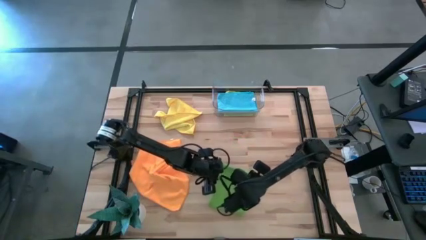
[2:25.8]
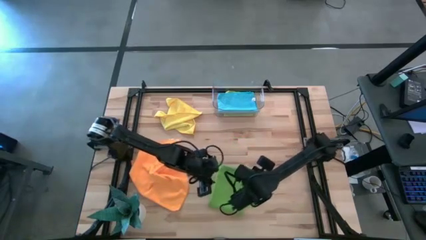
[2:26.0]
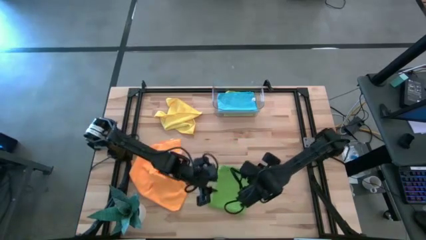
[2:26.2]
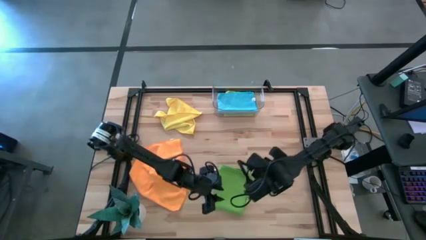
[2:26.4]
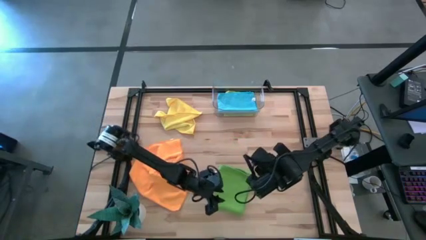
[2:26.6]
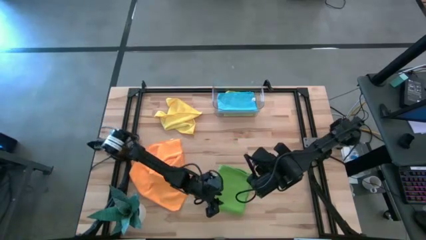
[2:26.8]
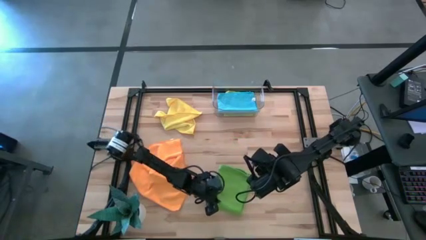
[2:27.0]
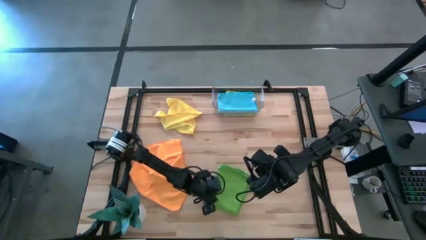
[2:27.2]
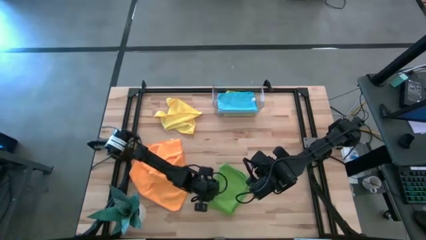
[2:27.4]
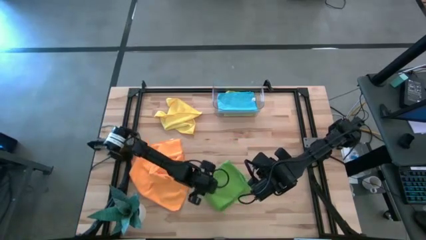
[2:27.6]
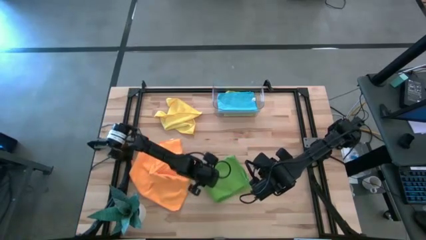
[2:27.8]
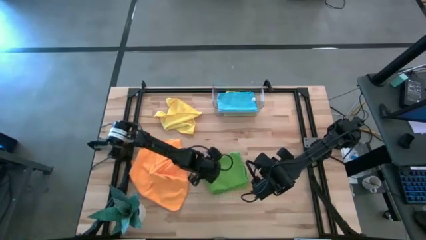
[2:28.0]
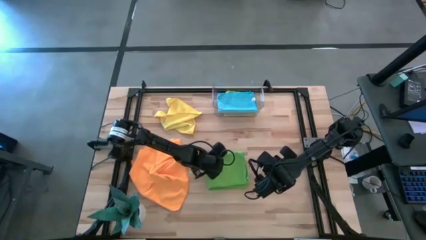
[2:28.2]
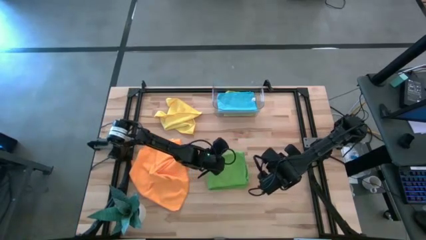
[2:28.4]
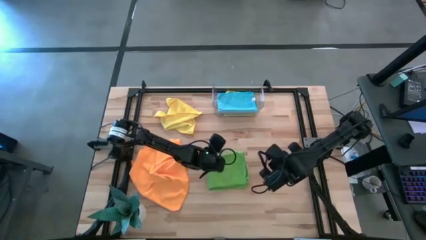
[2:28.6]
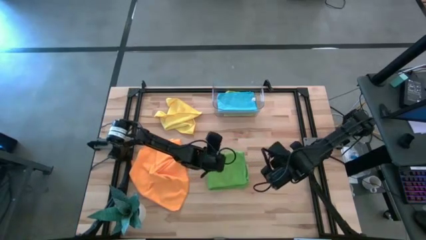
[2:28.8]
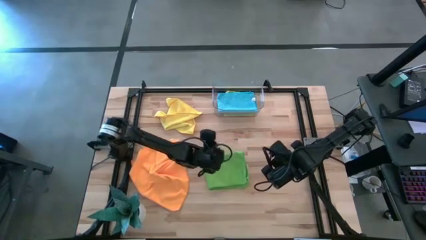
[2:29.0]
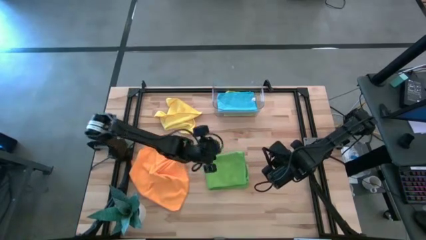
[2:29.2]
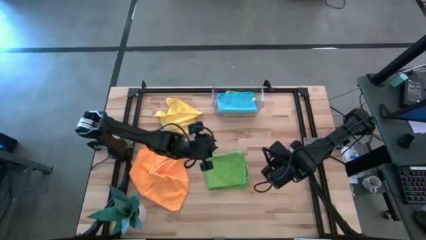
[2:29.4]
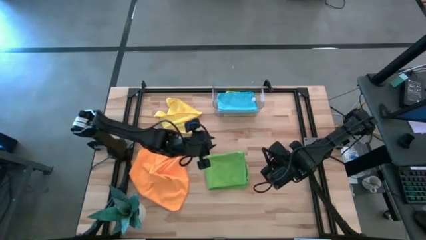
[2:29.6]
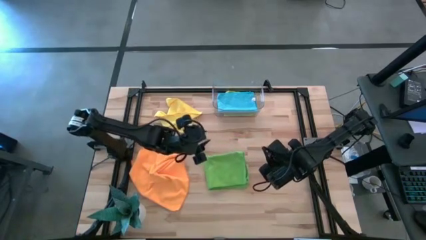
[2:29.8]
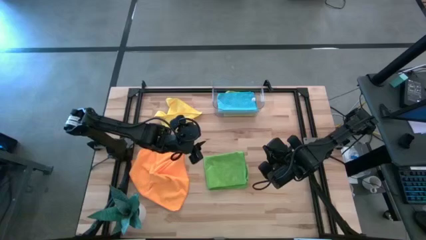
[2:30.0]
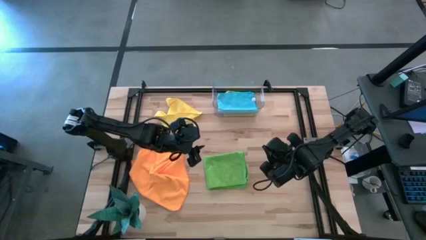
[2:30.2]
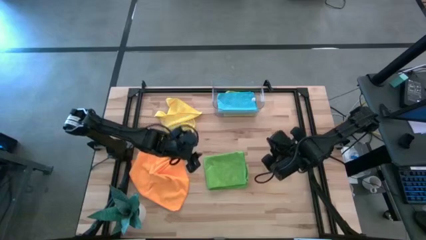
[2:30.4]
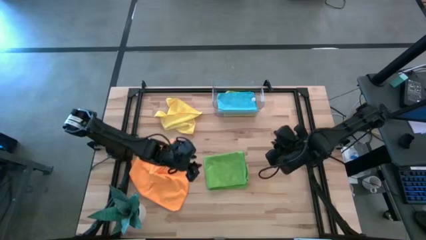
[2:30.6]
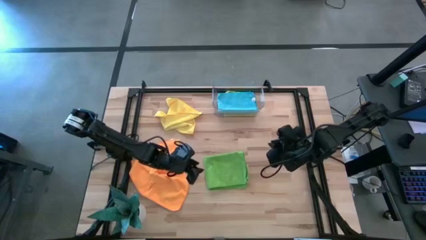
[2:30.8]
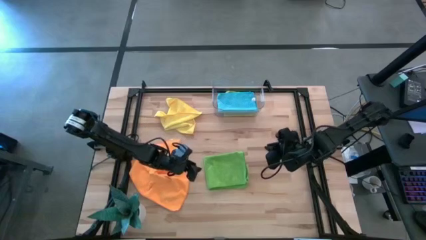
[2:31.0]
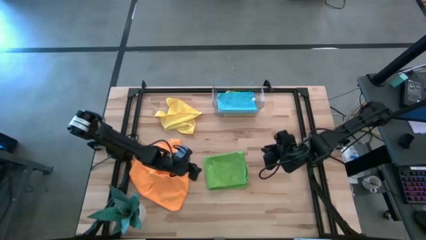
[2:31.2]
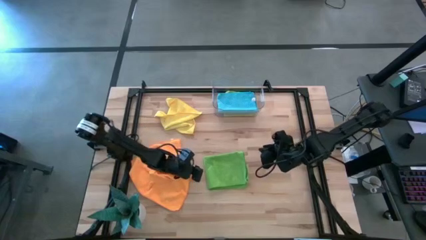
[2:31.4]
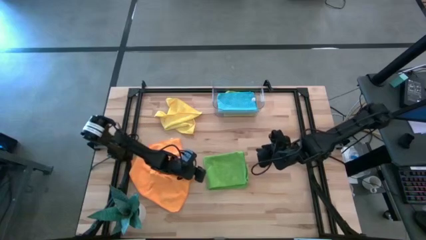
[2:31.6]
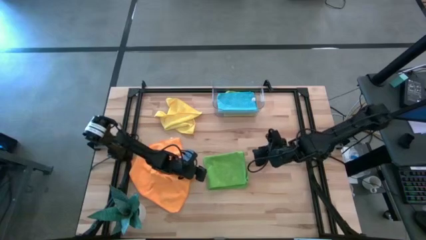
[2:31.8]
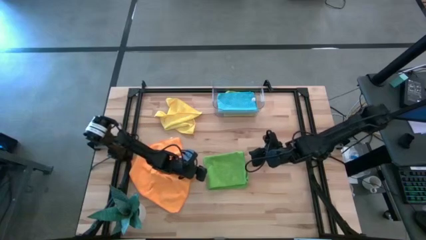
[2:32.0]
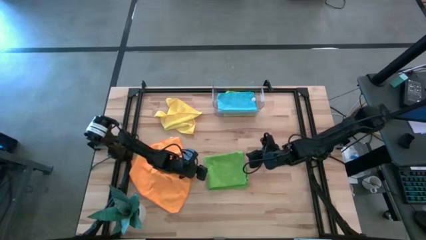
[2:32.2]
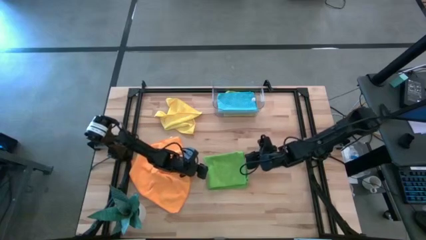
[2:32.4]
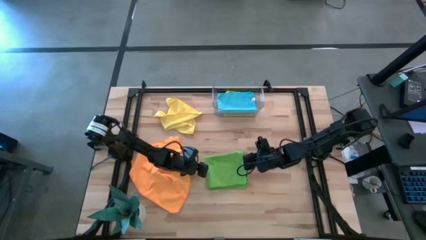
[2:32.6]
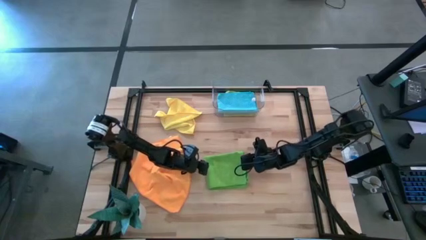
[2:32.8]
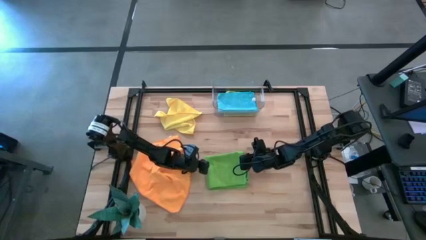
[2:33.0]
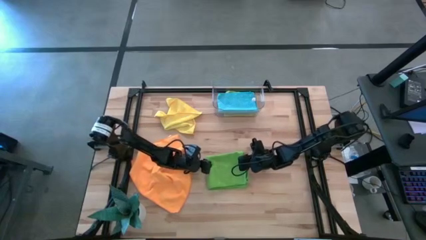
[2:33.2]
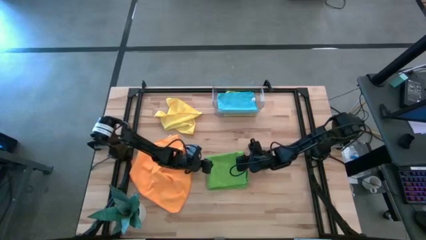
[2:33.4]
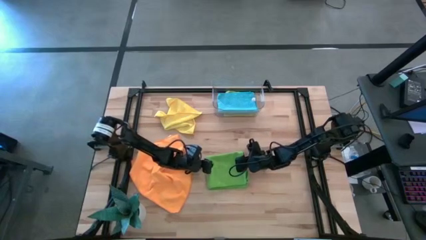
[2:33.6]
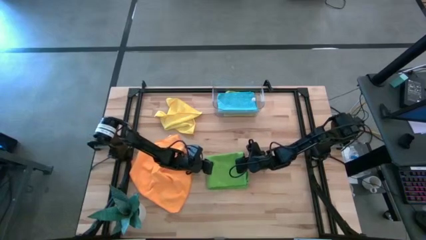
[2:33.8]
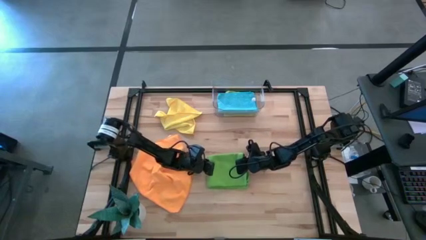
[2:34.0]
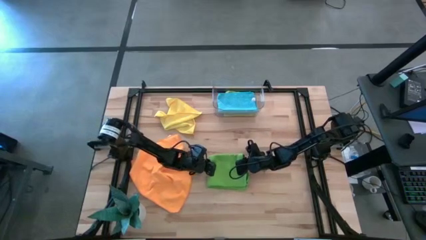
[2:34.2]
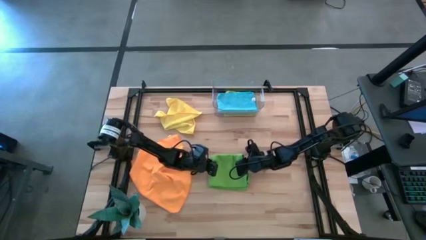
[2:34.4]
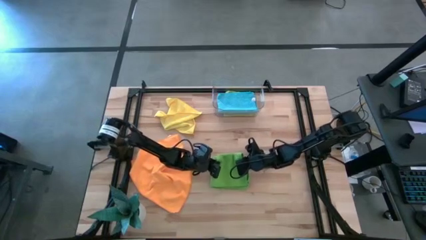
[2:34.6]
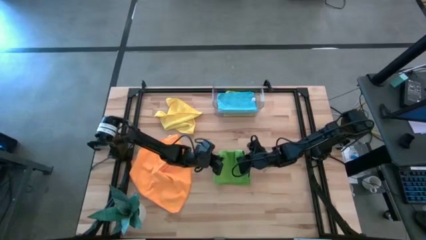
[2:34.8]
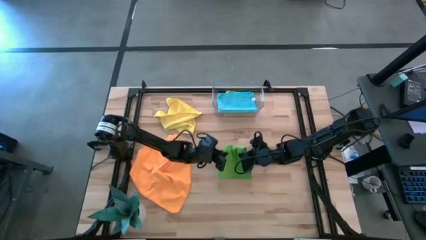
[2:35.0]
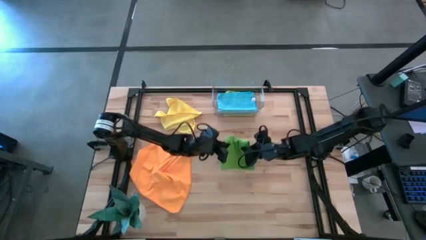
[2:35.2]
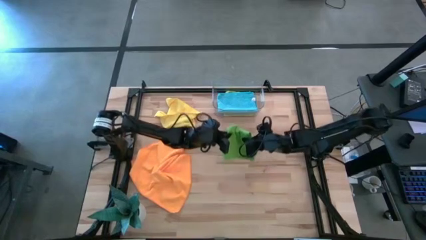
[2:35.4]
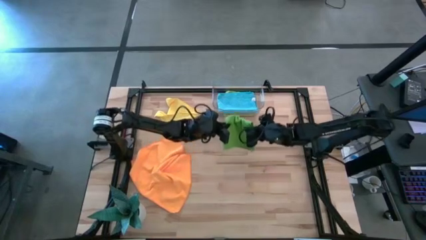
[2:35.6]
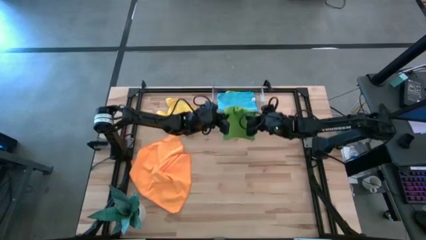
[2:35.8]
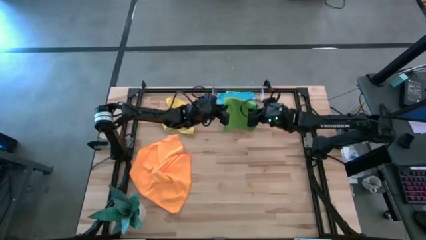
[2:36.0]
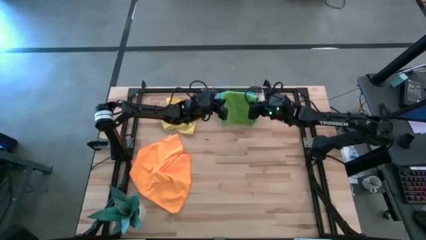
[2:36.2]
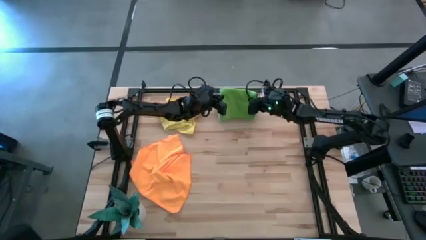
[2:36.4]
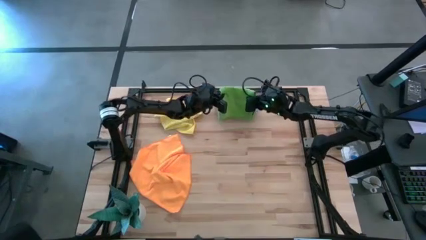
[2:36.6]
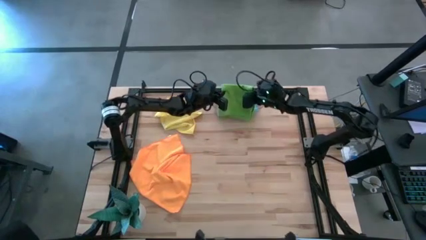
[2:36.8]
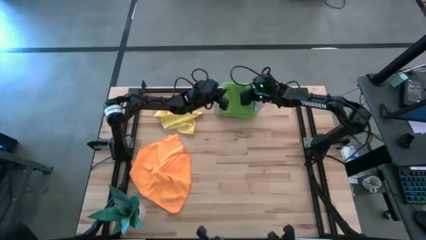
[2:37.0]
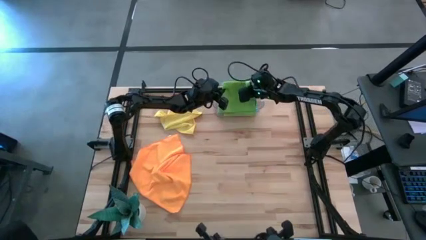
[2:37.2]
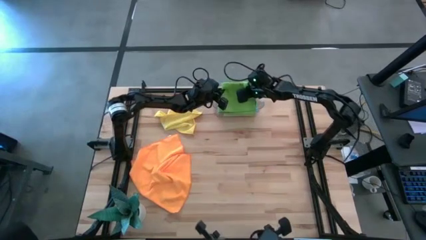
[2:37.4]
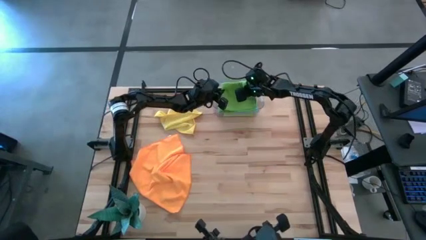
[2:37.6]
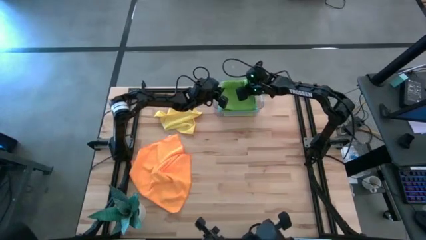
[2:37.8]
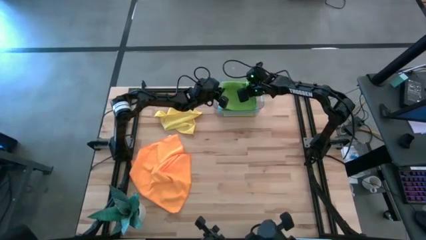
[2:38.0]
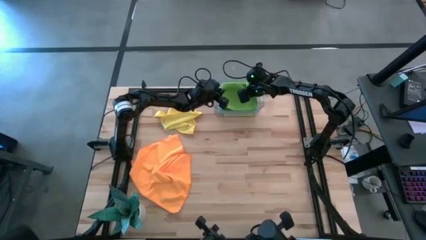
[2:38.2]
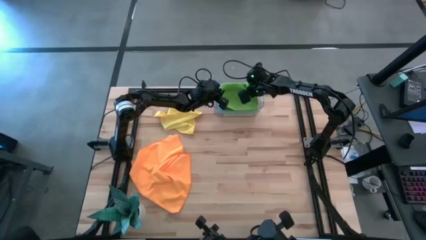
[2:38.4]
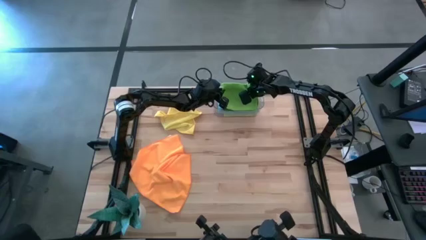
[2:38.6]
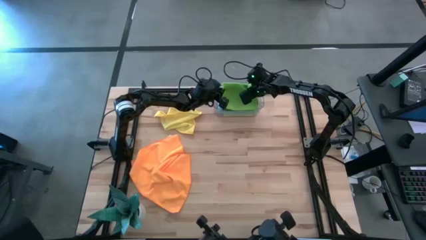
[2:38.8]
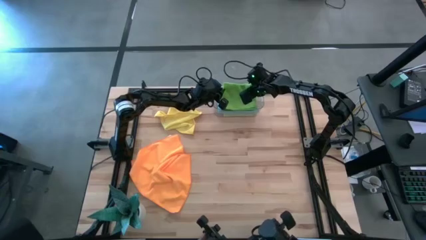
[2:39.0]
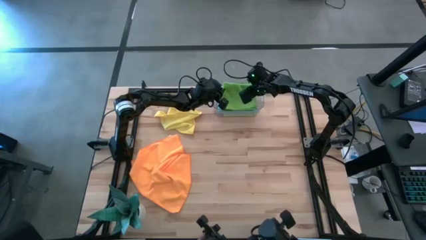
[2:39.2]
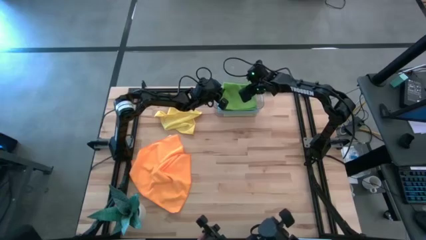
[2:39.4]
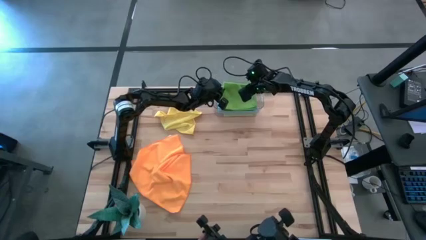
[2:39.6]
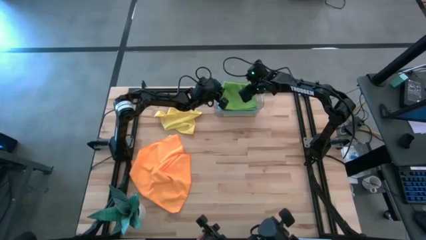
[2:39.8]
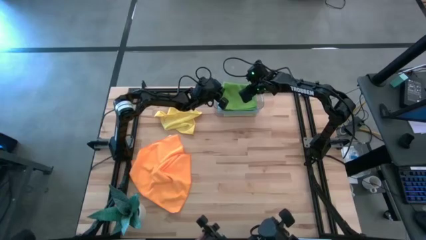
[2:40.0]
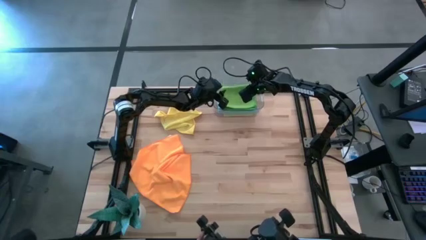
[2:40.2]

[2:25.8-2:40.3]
Task: Fold microfiber towels
Stack the green microfiber cloth on top of the blue microfiber cloth in the transparent bin

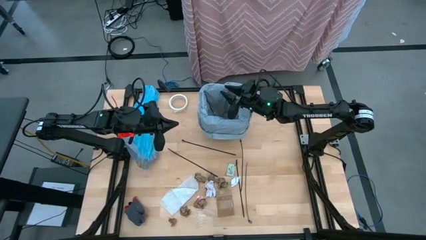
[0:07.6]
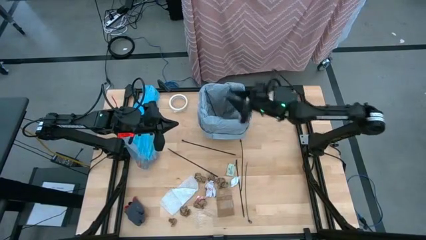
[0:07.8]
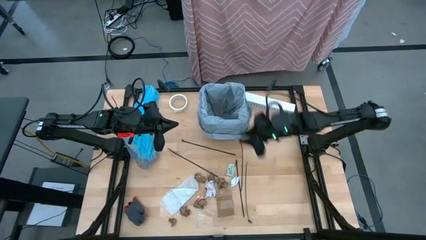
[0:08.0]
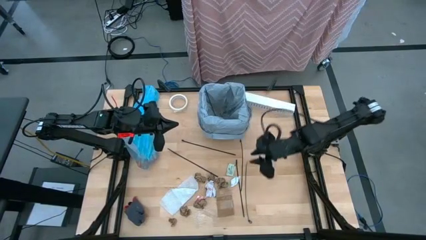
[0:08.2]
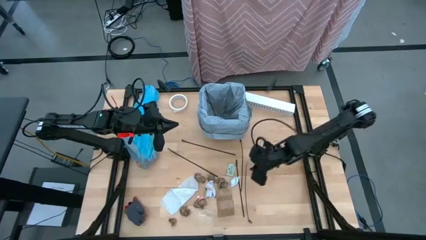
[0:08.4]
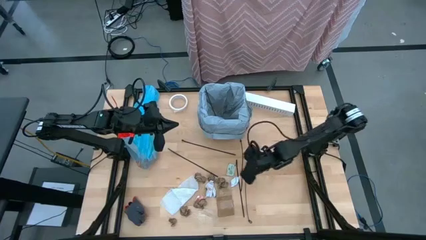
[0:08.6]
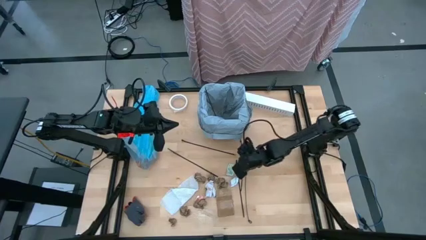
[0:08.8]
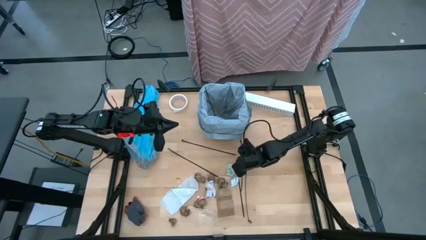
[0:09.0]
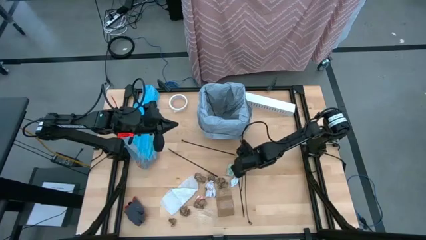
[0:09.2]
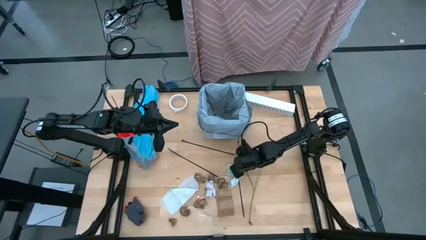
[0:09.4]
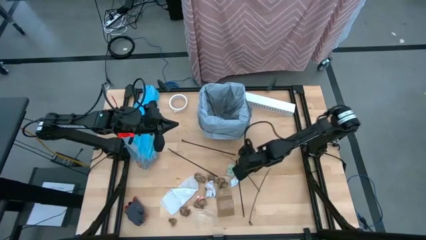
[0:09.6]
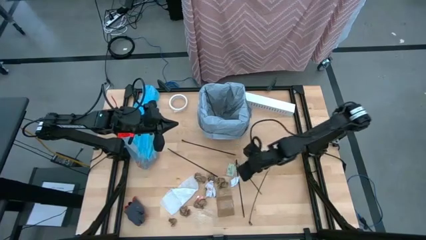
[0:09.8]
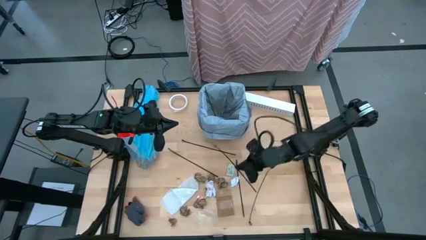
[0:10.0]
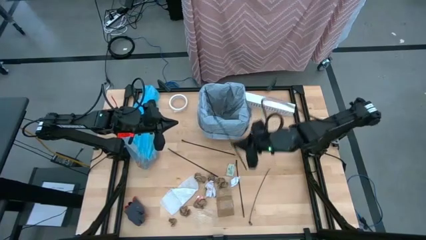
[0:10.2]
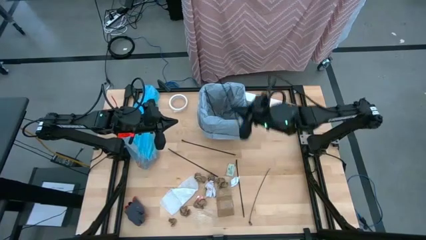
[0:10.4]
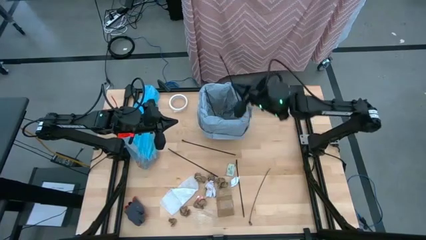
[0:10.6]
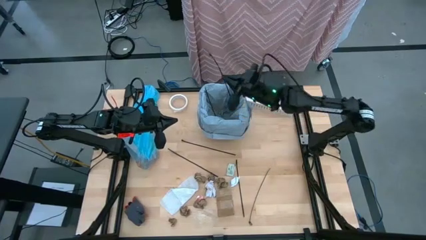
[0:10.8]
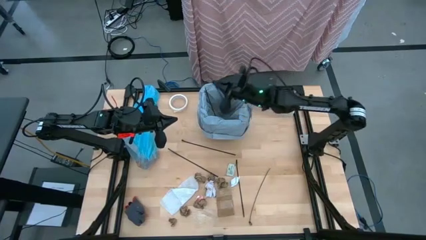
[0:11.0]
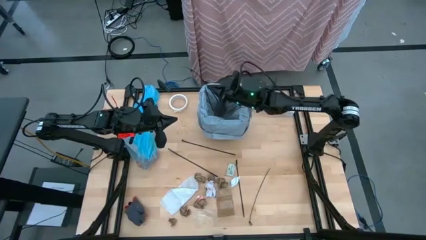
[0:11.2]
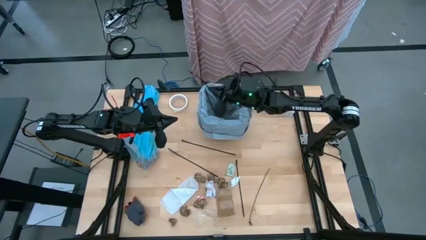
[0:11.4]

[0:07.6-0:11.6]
Task: place trash/remove bag and relplace
Put the zip tie into the trash bin
